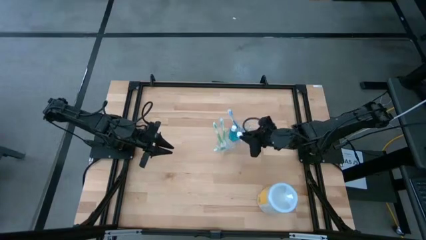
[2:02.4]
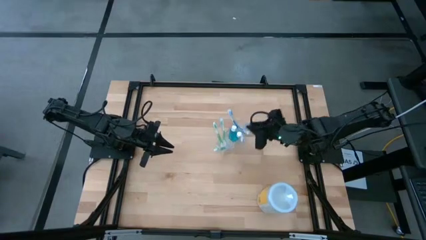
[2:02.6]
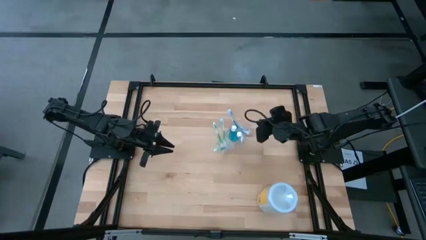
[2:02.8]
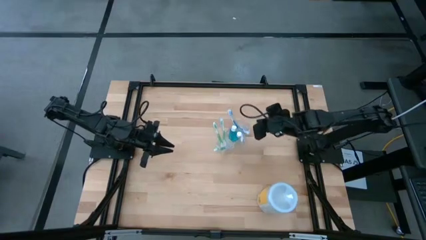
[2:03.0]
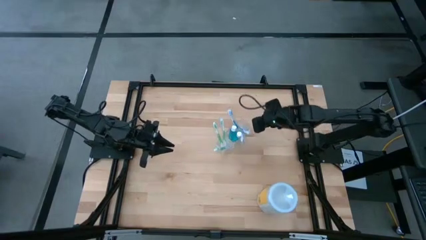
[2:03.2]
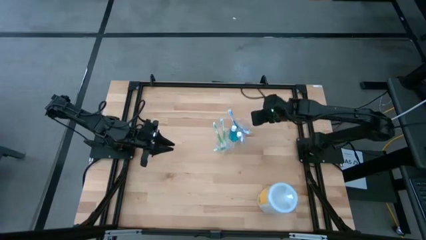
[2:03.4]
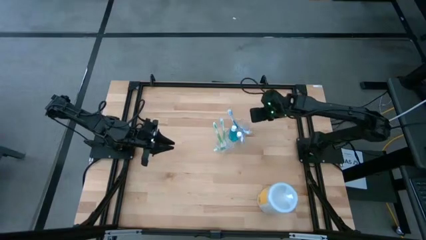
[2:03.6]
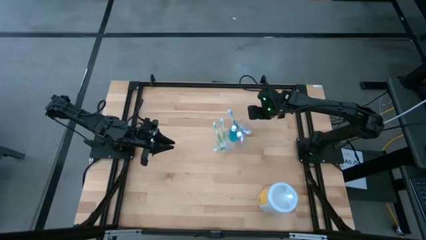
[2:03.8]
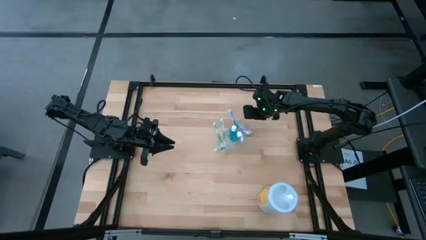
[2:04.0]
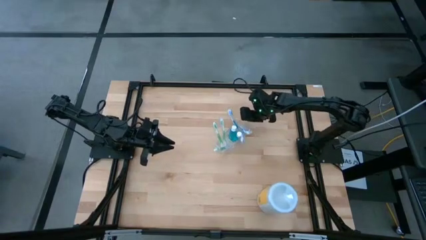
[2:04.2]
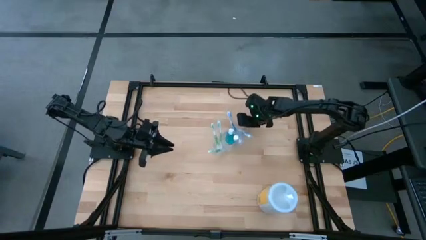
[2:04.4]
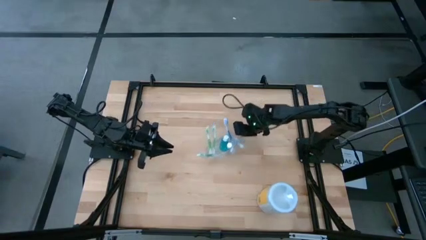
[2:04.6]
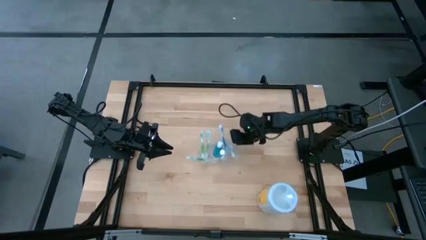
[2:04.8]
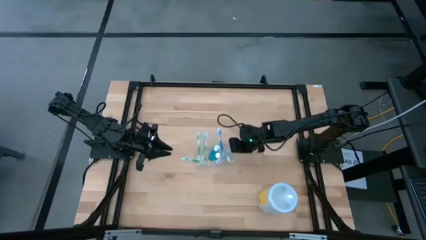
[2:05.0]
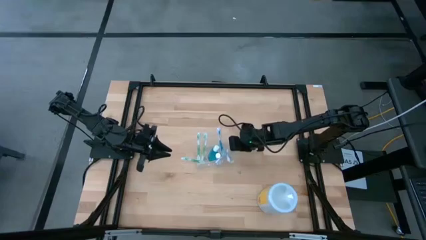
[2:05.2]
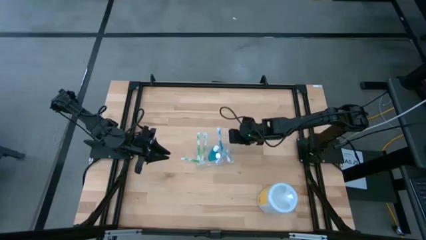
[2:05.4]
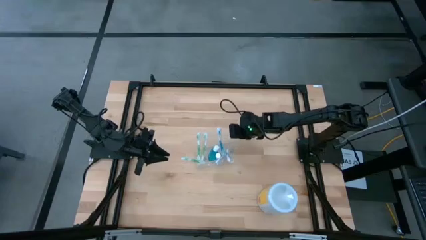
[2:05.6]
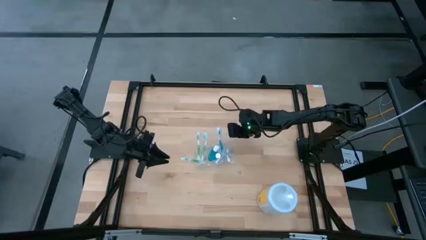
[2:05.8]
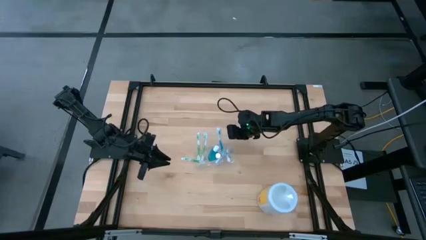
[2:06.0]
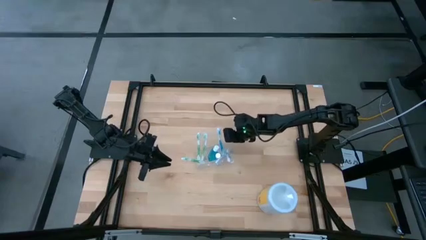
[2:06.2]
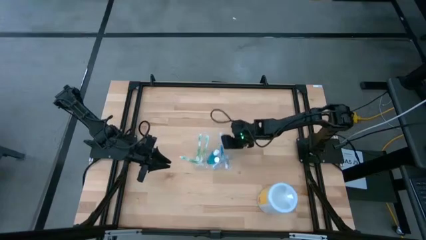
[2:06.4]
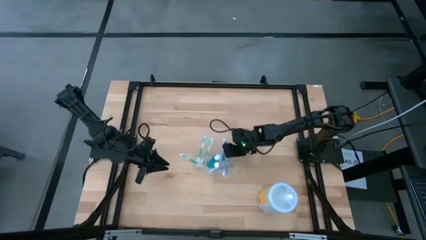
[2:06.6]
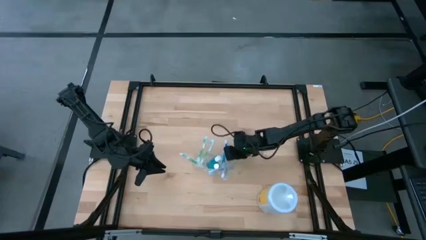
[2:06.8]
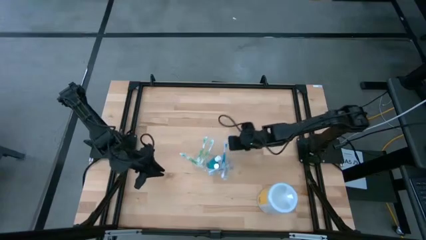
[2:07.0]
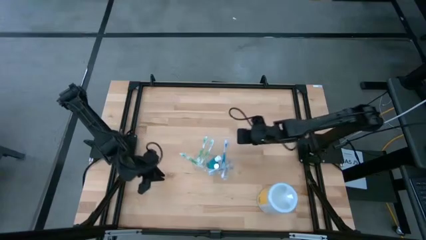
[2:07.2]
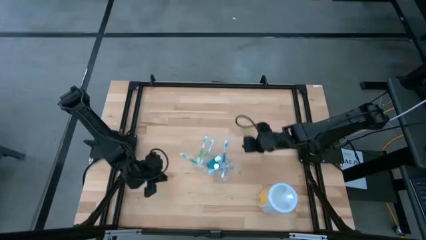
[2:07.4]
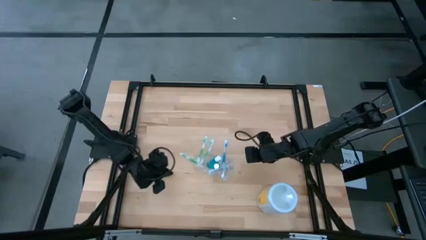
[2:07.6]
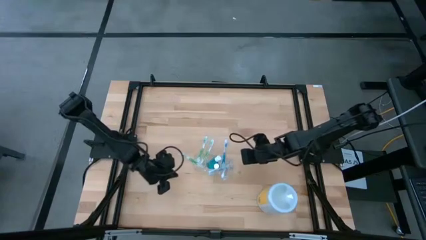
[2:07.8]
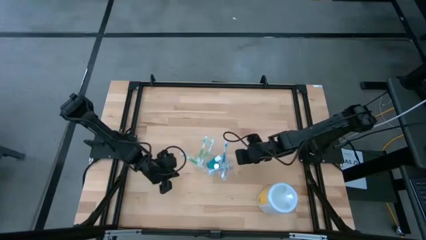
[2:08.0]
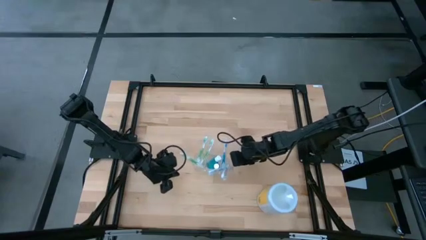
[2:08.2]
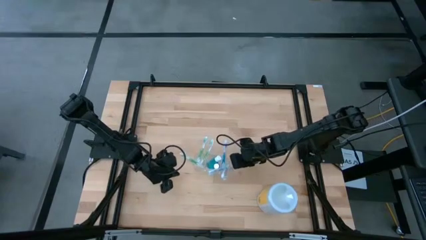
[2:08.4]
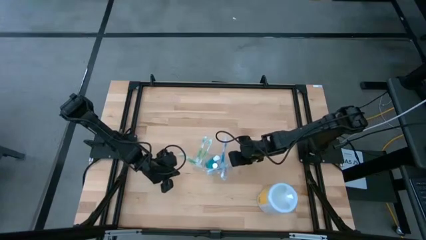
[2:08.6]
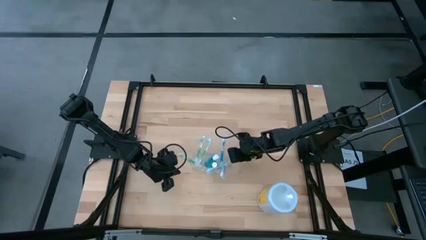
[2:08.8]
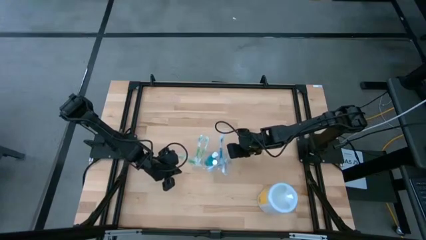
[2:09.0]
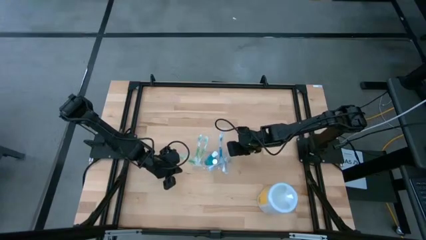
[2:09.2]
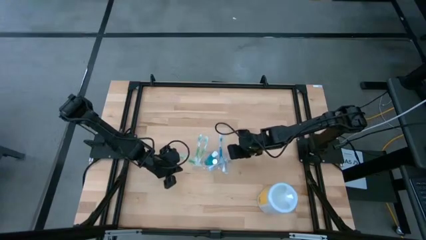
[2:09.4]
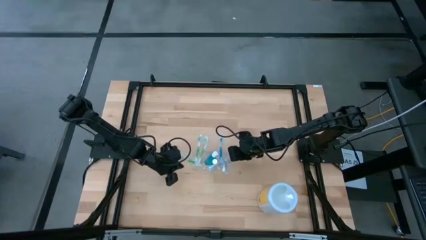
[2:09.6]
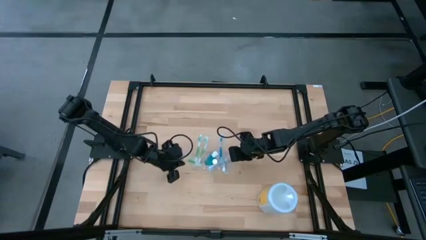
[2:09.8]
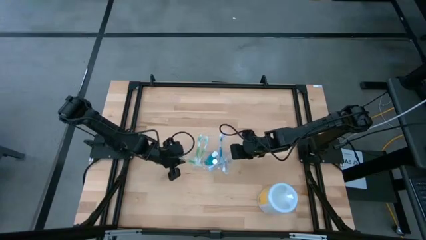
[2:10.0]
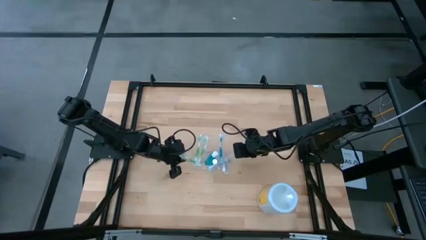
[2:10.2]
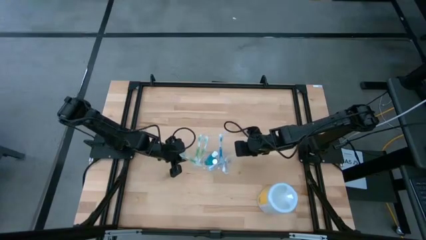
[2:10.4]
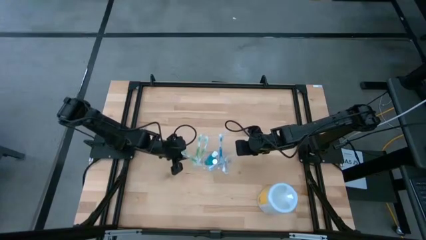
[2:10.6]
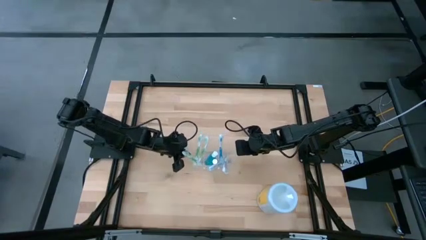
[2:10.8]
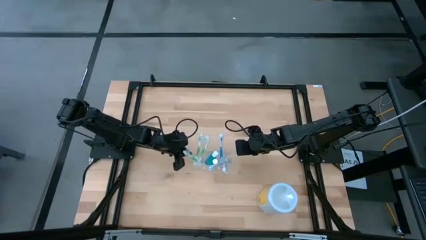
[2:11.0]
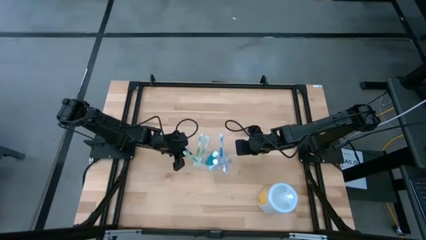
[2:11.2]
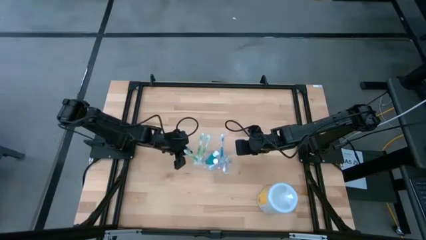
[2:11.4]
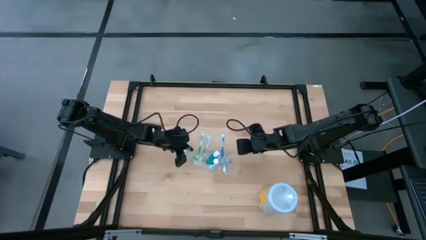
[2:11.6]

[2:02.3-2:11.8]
Task: Pick & Place toothbrushing station
Adjust the transparent organizer

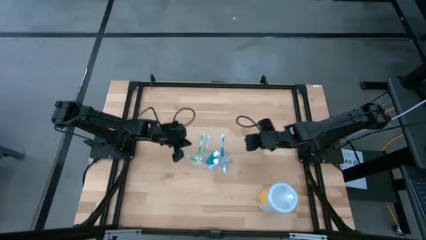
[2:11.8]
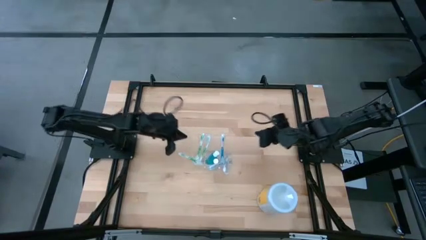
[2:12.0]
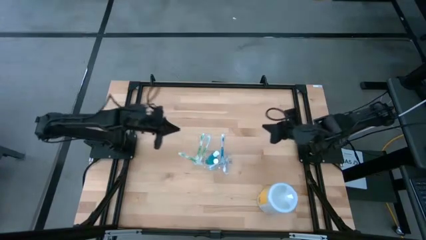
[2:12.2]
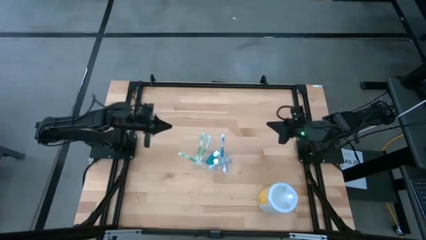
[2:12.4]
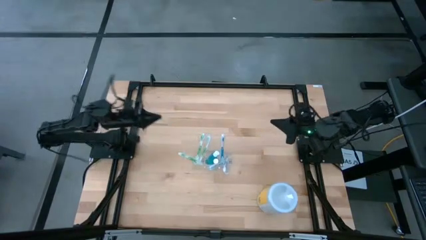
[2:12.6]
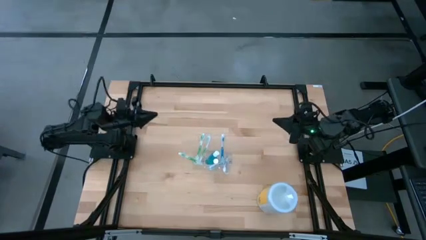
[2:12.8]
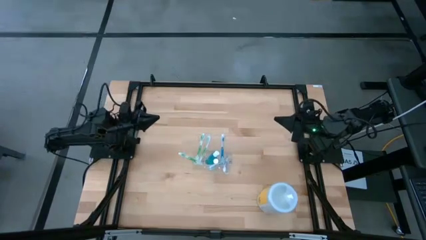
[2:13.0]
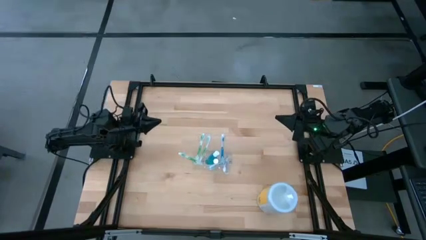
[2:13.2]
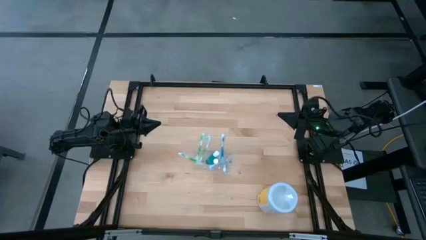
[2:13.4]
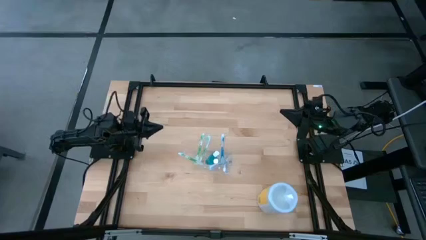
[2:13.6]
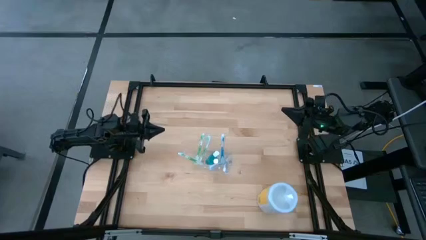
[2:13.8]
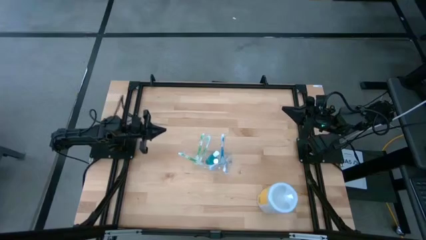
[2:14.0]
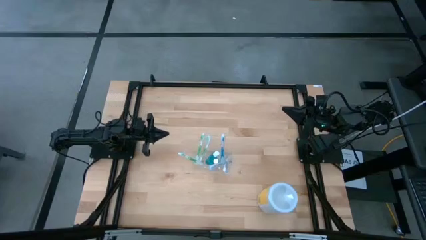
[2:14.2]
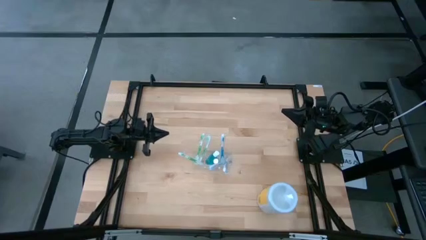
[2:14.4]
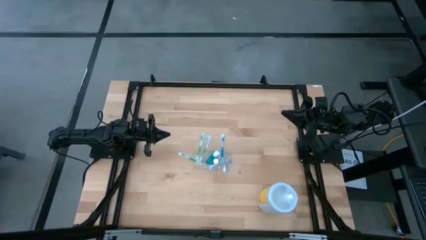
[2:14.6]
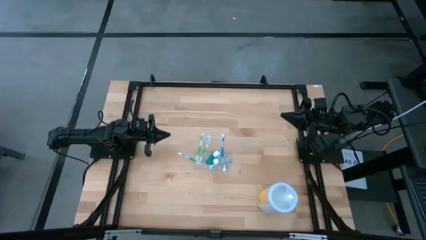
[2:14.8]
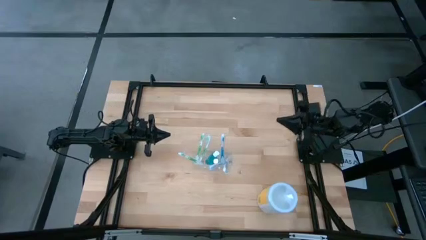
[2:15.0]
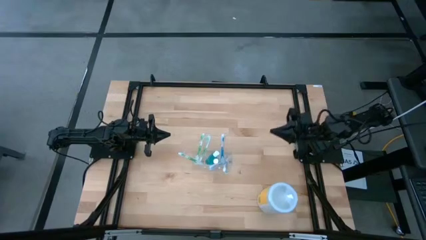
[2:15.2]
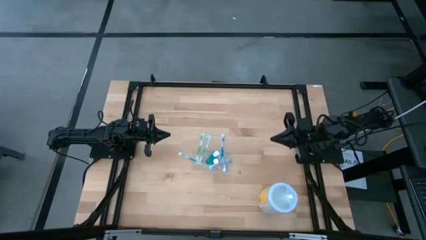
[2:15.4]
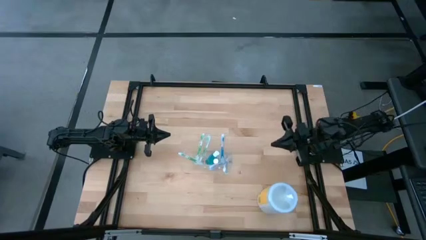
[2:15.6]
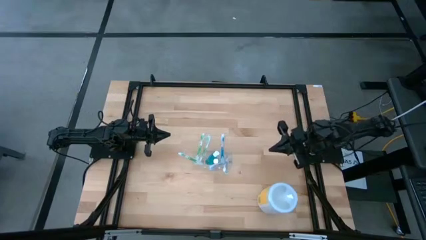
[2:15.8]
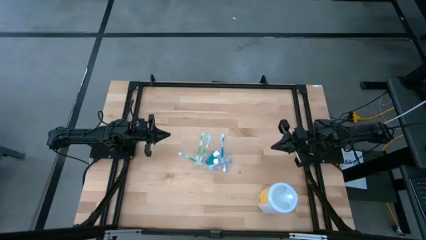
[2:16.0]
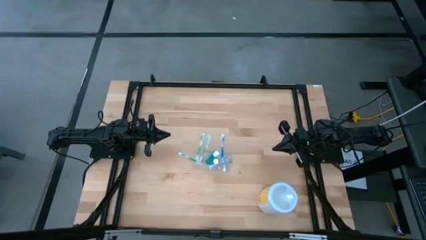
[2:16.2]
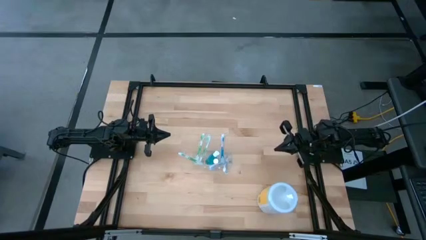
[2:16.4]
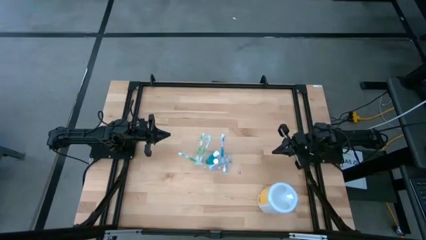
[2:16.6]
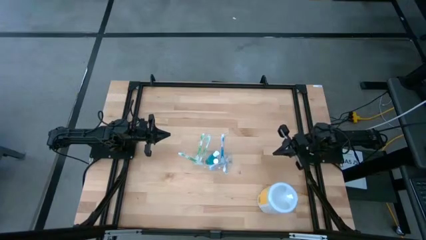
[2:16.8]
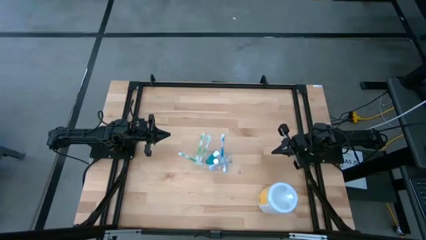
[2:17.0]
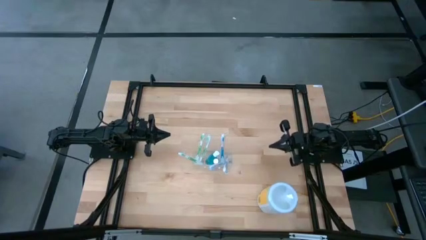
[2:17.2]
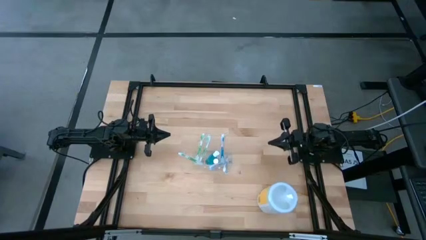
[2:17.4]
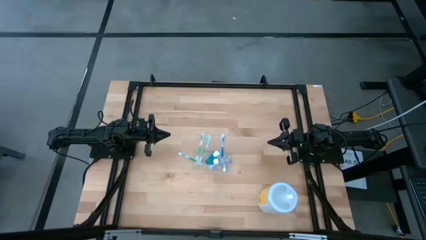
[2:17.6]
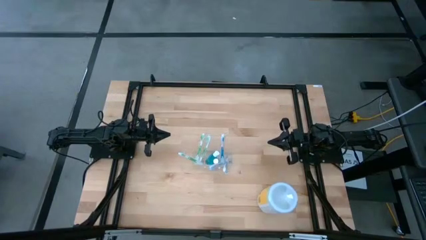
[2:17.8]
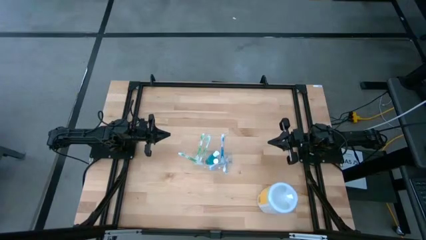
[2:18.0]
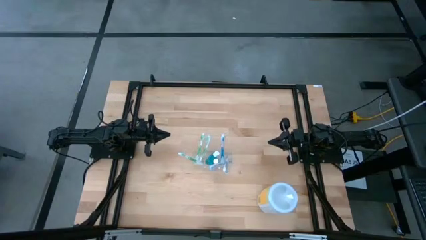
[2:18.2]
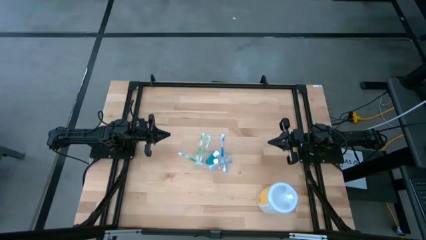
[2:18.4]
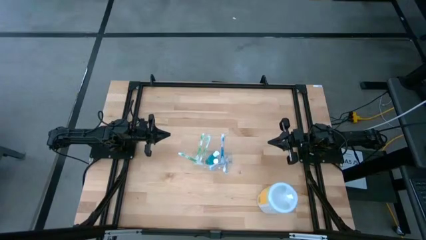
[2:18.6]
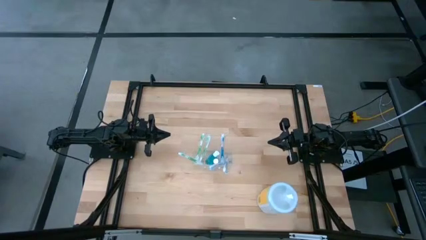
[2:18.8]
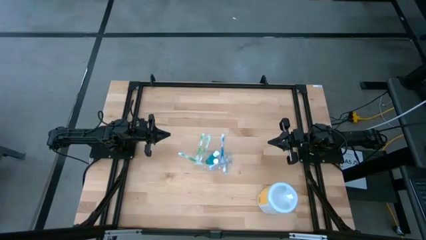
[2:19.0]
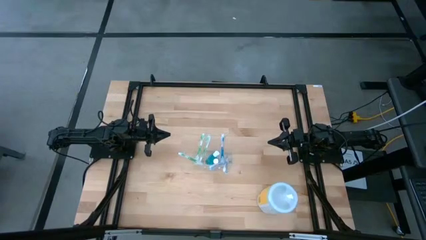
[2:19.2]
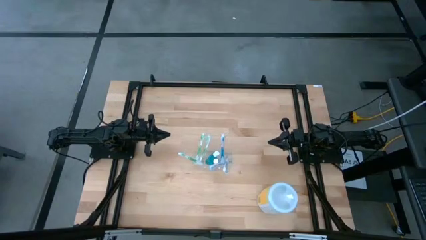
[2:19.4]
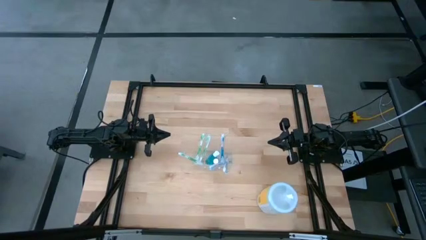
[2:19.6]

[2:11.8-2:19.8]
Return to Home Position
